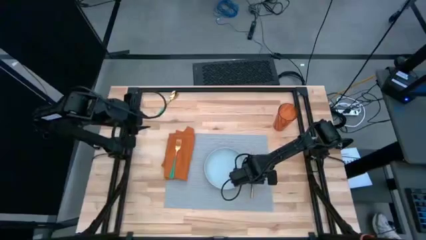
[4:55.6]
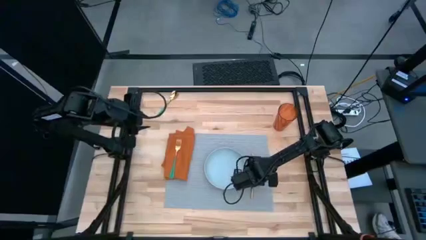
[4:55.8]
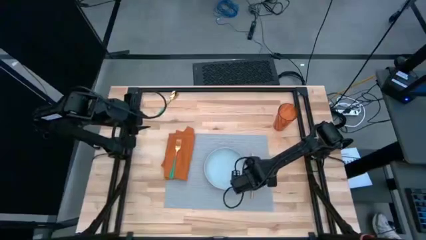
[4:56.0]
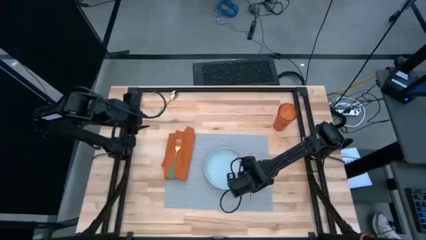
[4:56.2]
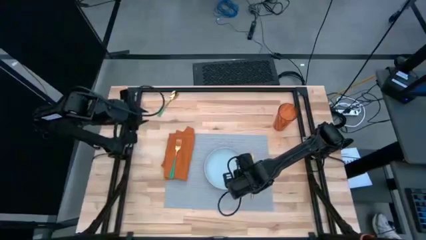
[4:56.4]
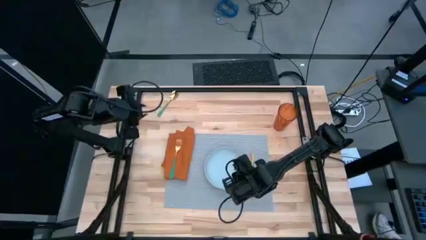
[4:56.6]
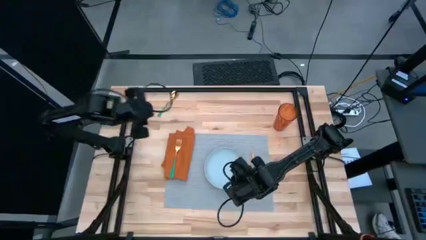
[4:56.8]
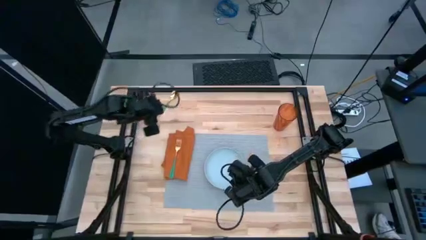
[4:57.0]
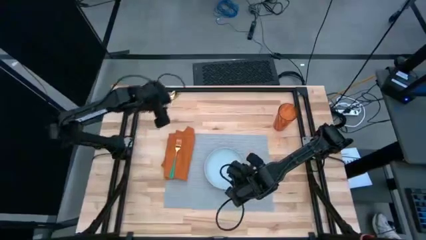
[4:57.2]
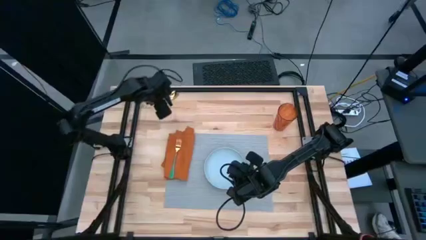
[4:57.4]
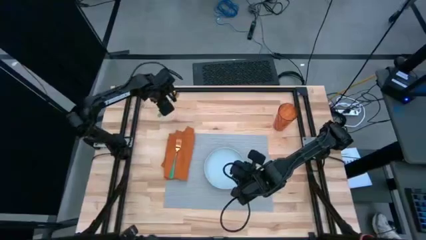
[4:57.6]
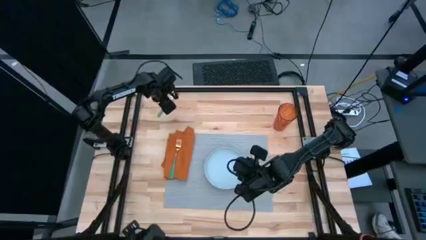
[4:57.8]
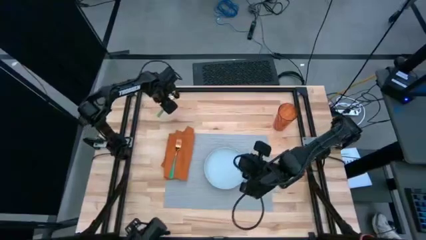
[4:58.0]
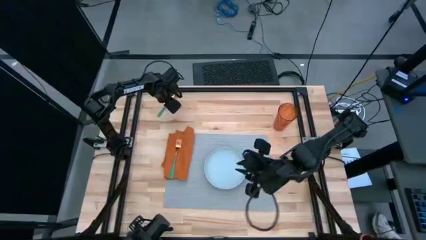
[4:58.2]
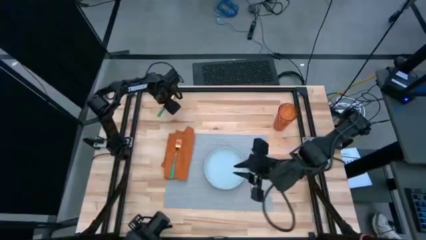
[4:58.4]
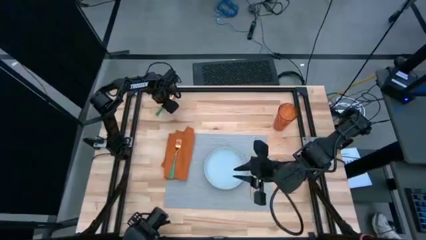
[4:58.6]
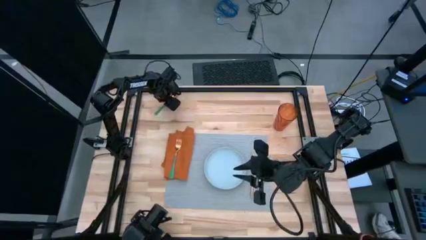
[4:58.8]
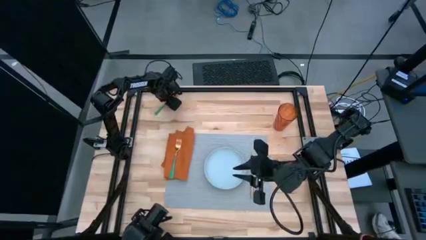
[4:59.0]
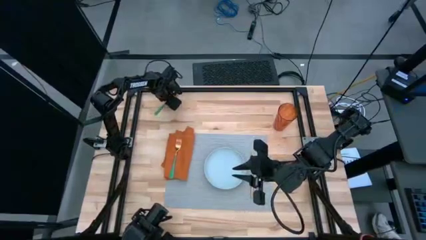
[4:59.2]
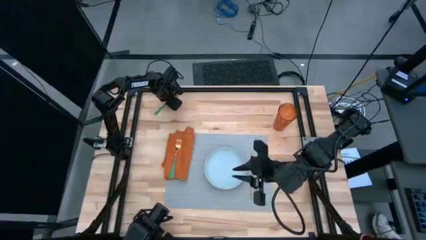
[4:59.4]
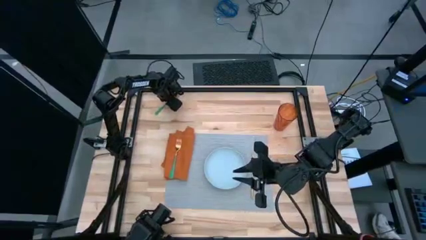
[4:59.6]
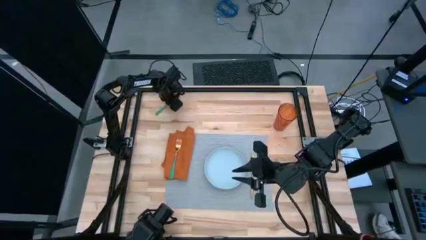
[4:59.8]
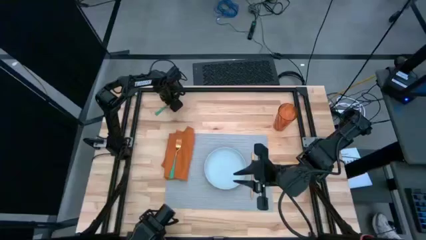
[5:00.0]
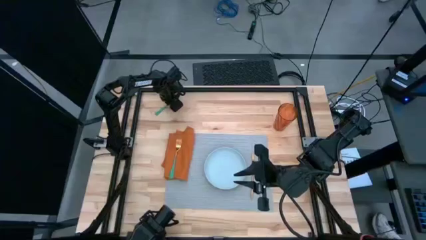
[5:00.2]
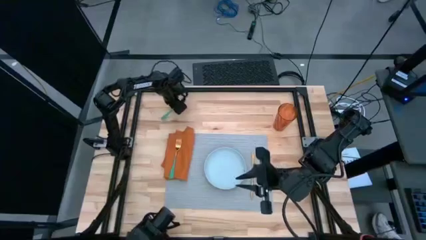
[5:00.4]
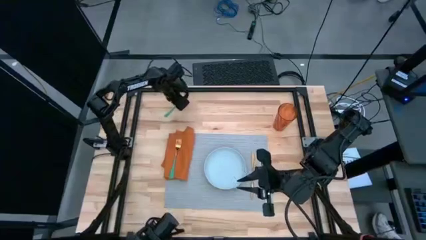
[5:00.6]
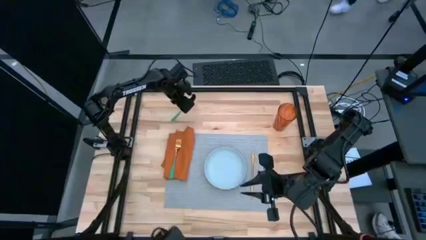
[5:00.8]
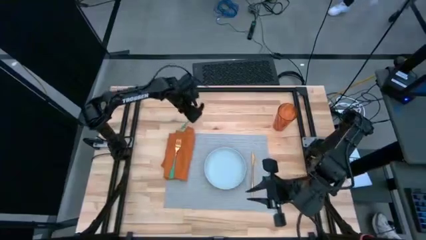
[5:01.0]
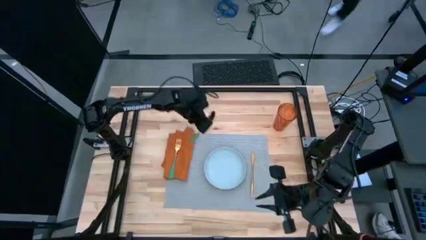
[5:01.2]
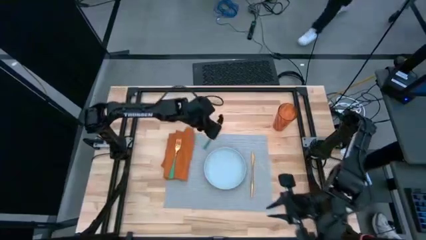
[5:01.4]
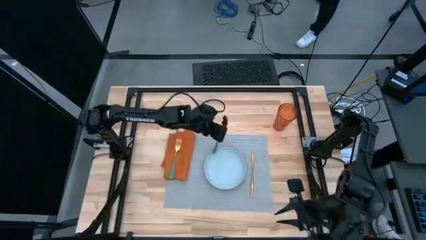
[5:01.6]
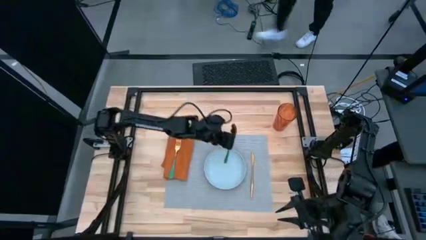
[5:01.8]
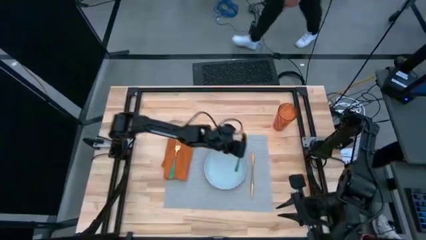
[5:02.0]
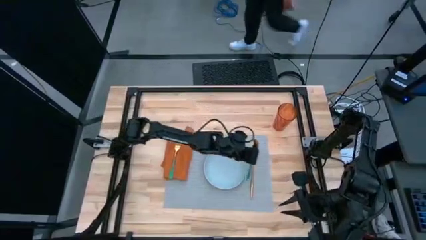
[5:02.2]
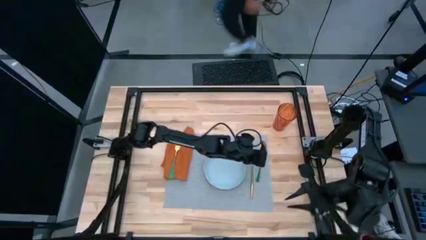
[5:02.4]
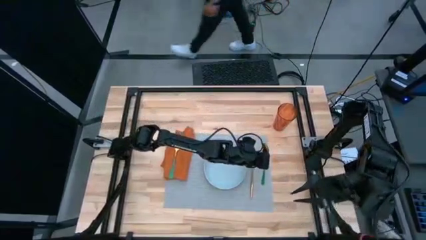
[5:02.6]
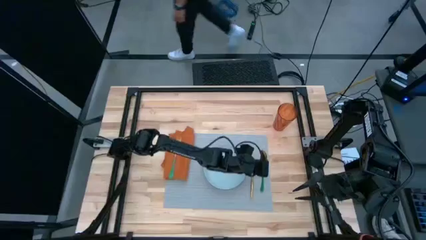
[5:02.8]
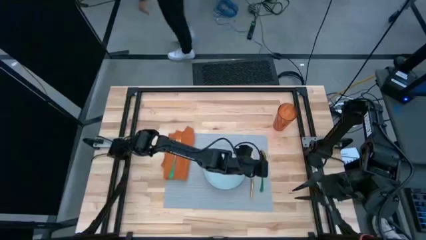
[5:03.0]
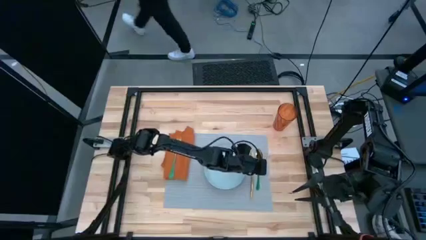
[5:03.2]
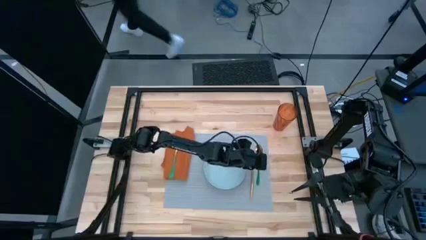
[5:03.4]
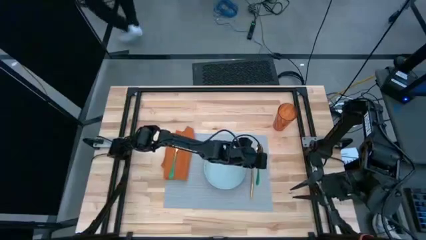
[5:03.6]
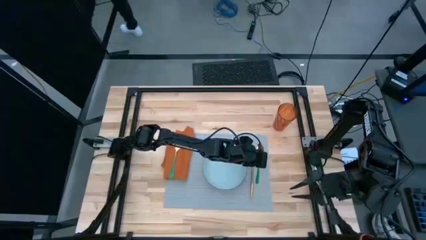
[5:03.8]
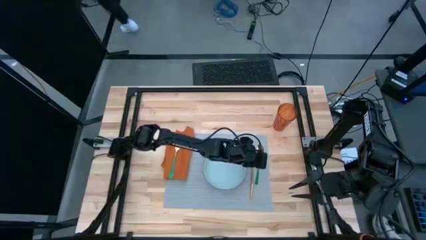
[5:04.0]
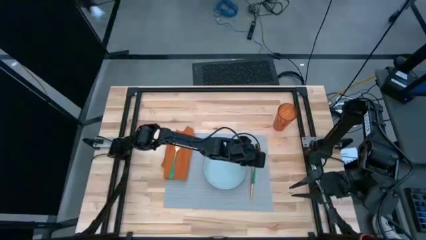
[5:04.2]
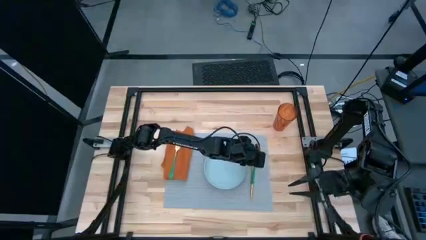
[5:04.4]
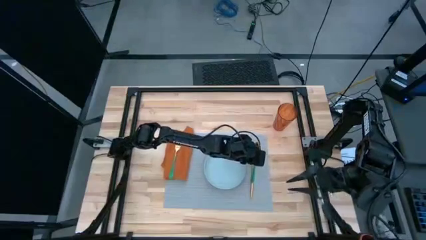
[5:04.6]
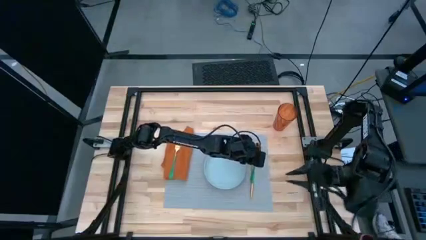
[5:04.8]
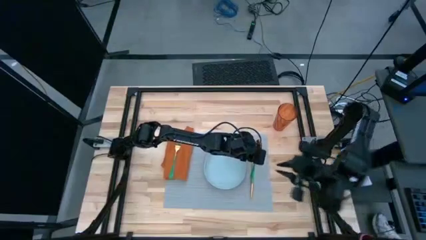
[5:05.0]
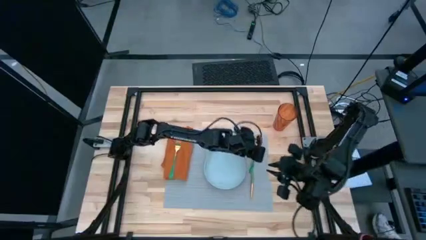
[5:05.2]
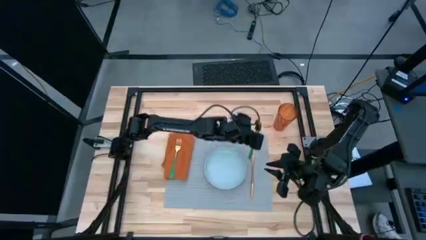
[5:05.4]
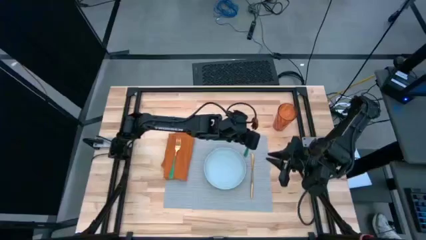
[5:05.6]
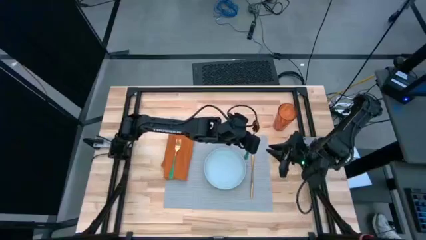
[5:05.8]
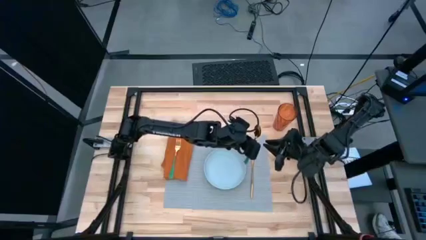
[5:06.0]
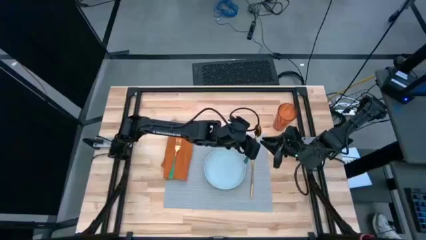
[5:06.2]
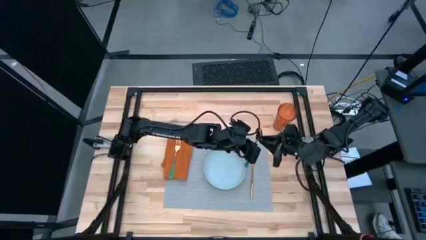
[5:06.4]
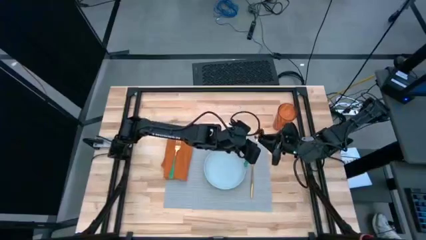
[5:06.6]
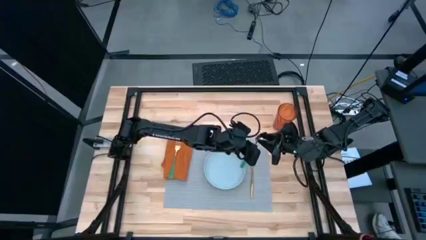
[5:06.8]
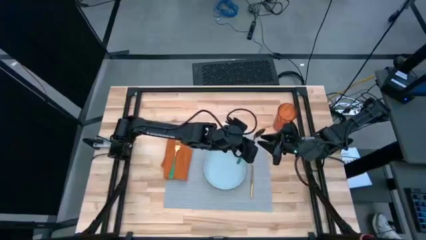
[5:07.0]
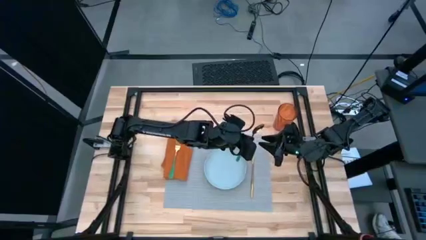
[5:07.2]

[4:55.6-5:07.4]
Task: Set table place
Put the green spoon on the gray table mat to the right of the gold table knife

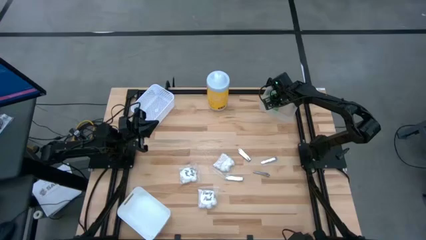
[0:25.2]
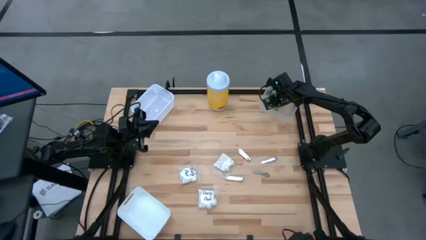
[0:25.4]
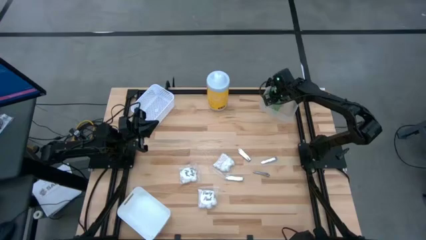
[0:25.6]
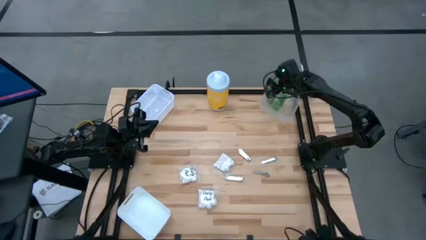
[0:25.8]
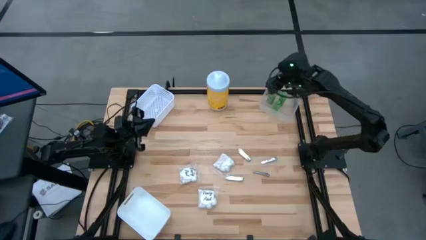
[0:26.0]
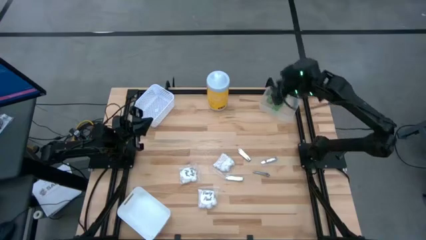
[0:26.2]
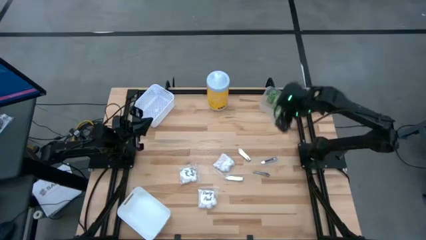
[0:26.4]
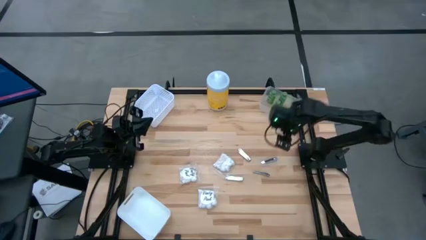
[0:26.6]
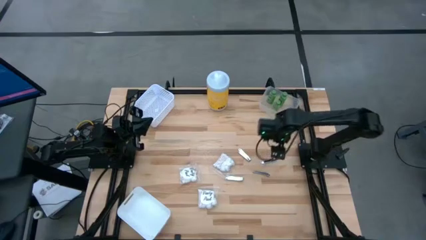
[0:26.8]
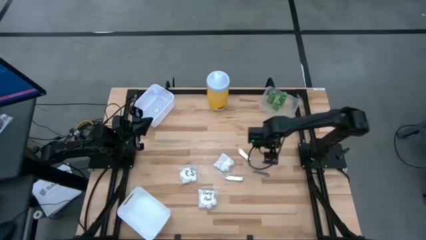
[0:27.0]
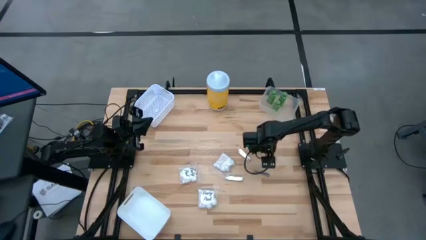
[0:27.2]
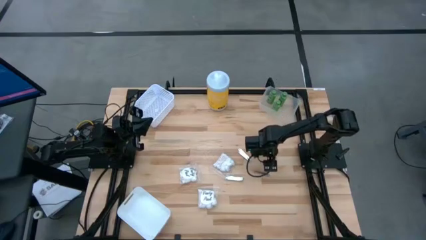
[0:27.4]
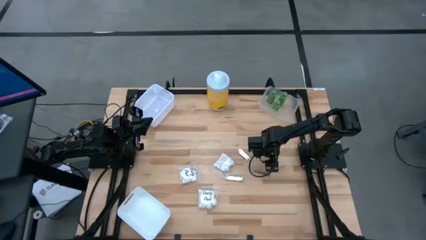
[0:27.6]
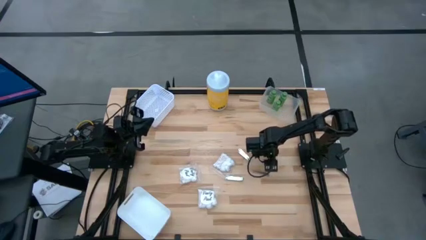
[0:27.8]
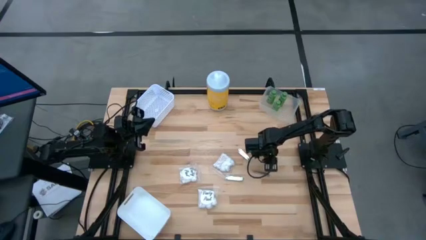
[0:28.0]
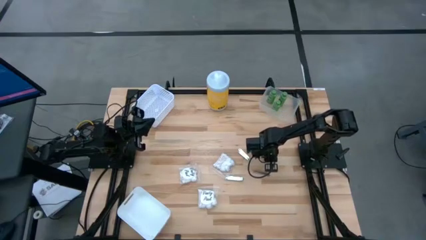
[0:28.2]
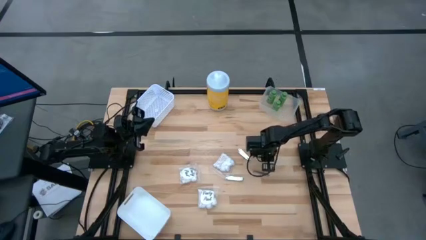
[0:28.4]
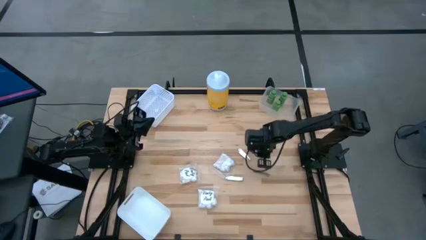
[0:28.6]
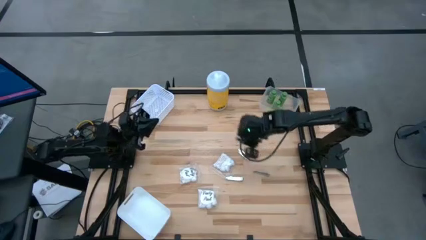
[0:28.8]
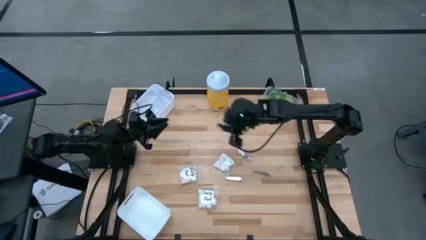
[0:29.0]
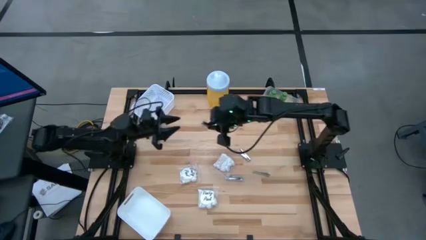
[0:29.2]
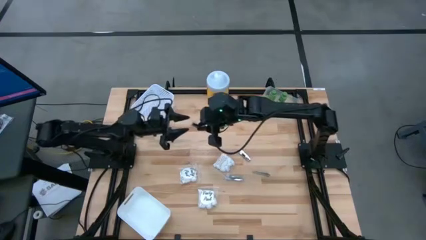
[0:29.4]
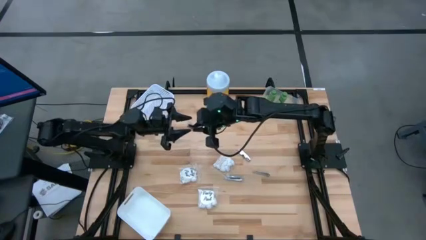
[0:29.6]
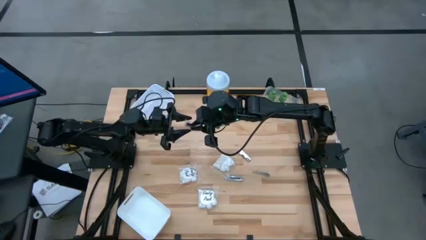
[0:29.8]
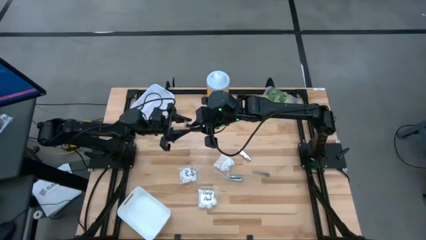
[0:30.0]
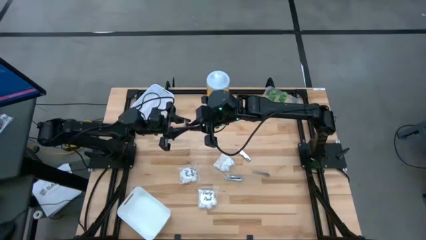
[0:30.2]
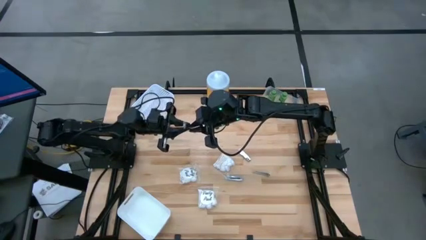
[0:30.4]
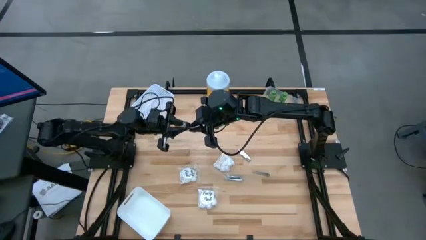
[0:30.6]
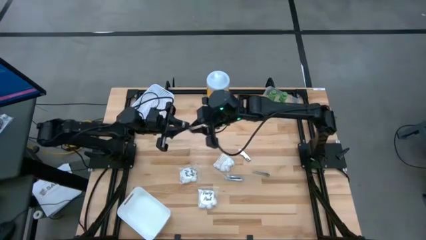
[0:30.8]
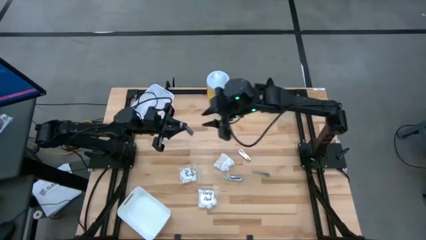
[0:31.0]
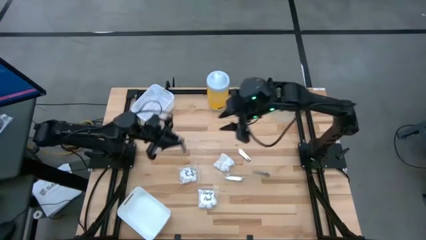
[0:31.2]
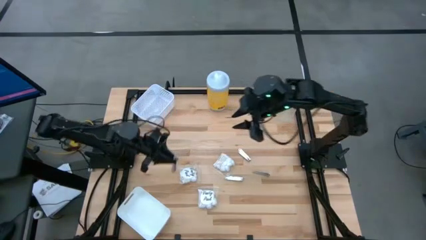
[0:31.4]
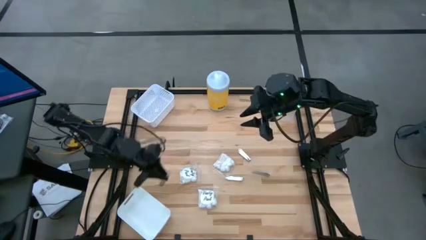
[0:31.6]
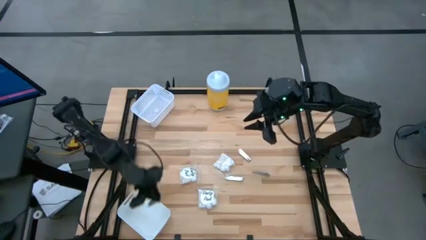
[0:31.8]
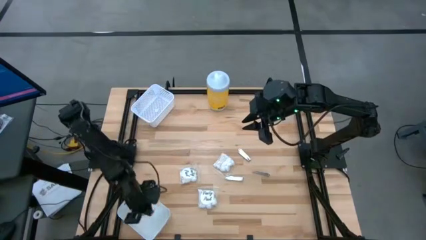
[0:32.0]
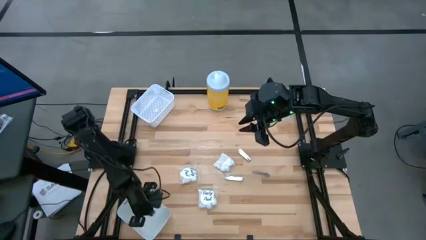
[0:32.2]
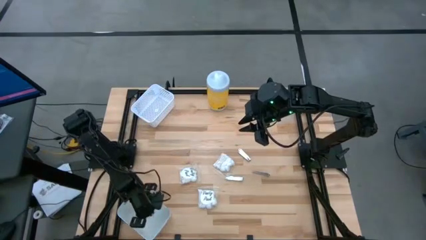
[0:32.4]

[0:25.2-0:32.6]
Task: Pick & Place Travel size toiletries
Put the silver nail cutter into the white bin
